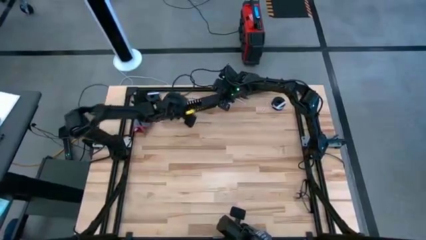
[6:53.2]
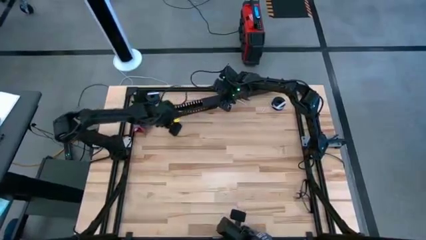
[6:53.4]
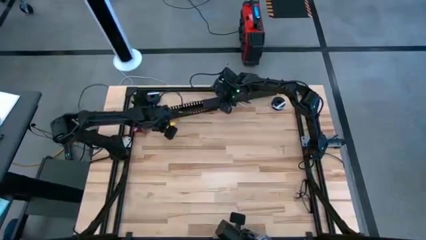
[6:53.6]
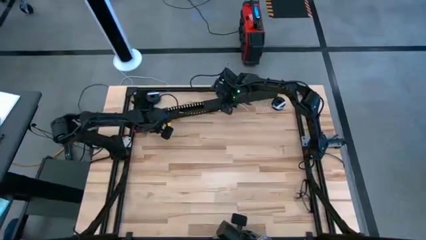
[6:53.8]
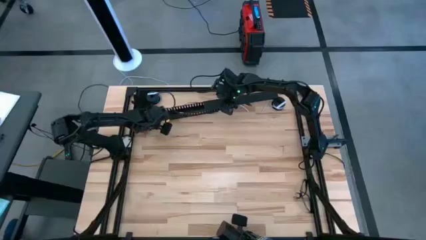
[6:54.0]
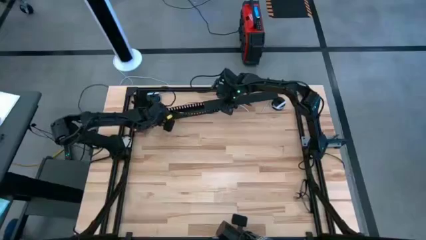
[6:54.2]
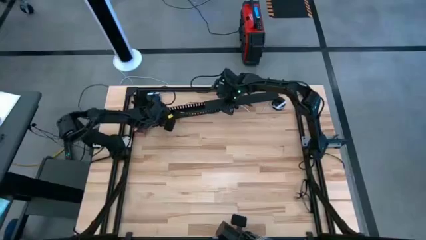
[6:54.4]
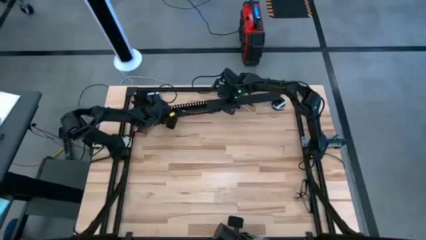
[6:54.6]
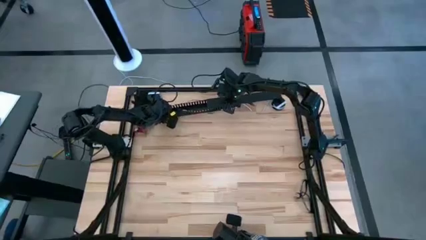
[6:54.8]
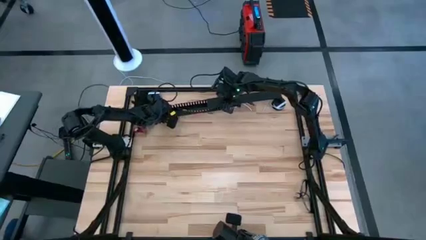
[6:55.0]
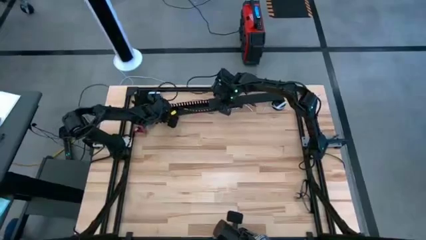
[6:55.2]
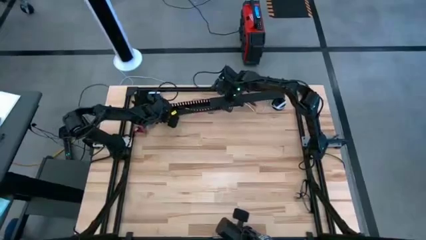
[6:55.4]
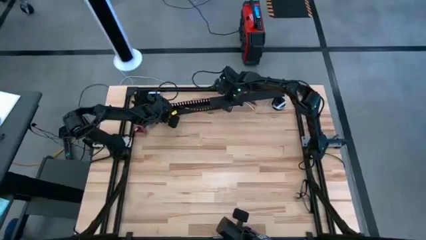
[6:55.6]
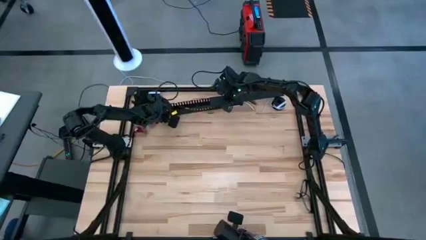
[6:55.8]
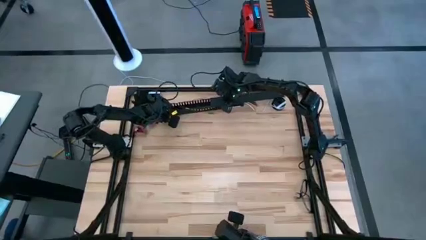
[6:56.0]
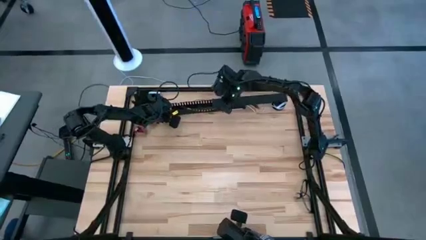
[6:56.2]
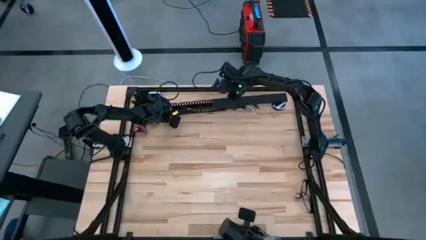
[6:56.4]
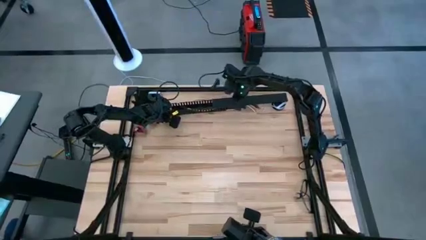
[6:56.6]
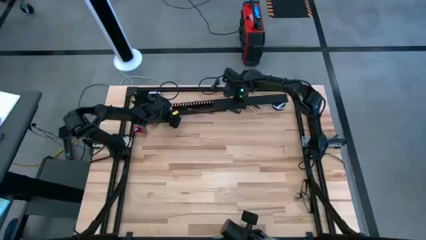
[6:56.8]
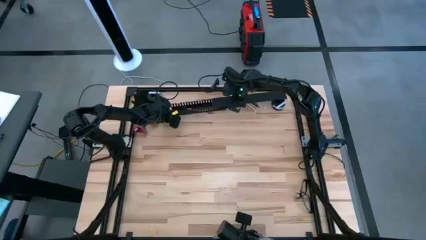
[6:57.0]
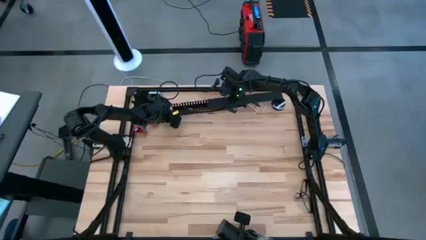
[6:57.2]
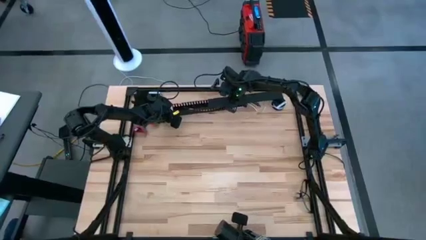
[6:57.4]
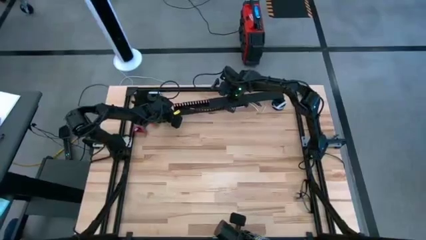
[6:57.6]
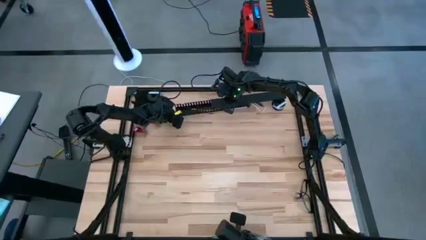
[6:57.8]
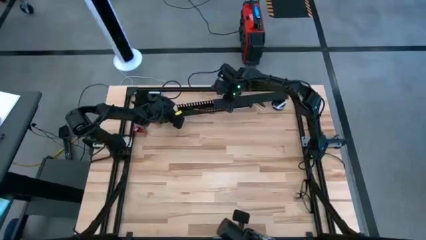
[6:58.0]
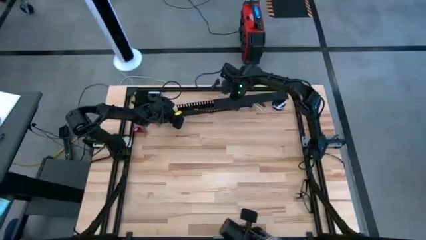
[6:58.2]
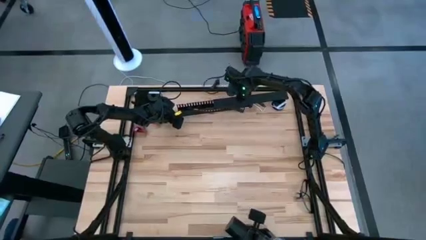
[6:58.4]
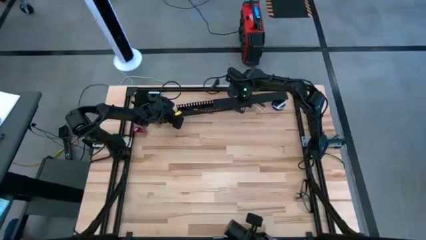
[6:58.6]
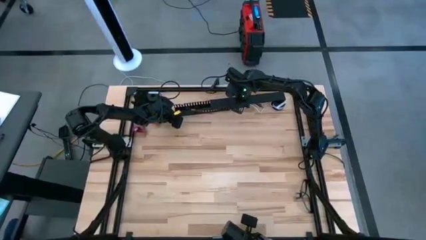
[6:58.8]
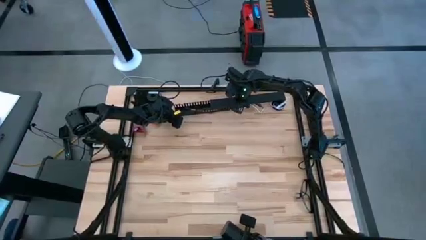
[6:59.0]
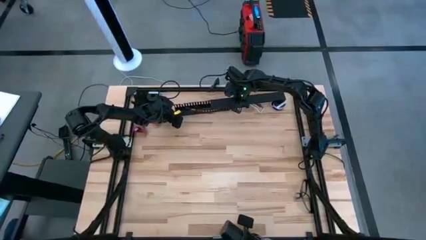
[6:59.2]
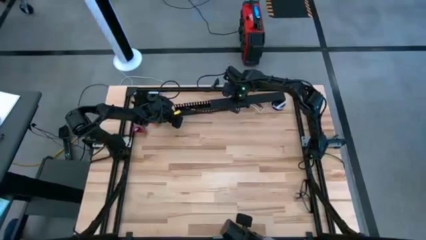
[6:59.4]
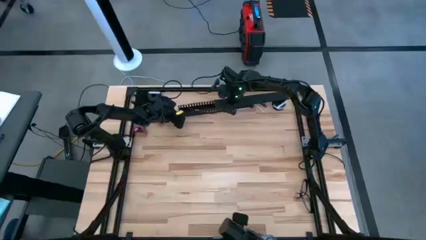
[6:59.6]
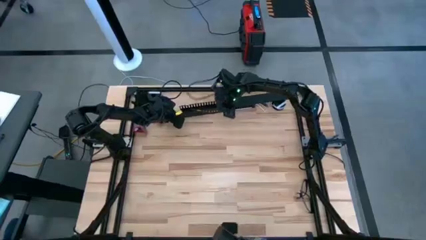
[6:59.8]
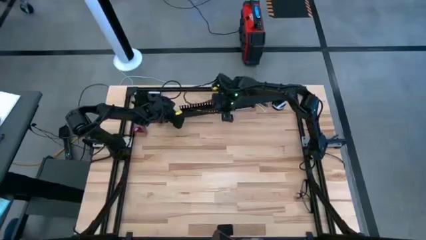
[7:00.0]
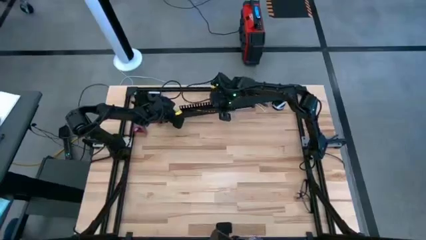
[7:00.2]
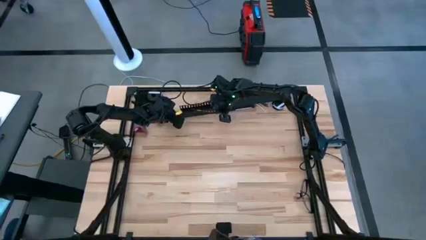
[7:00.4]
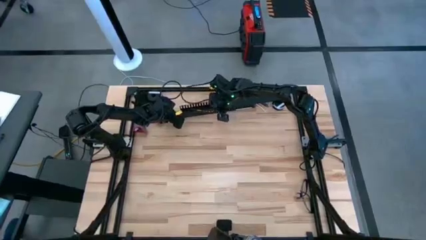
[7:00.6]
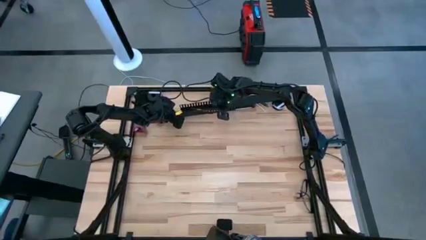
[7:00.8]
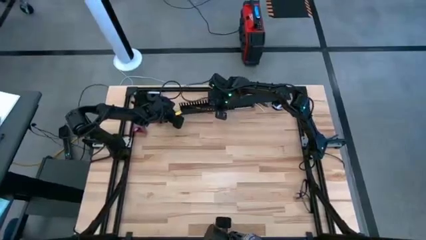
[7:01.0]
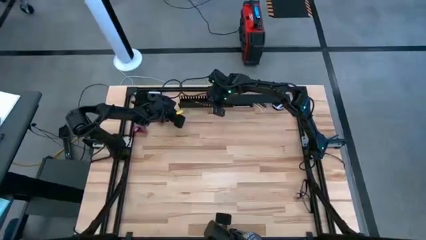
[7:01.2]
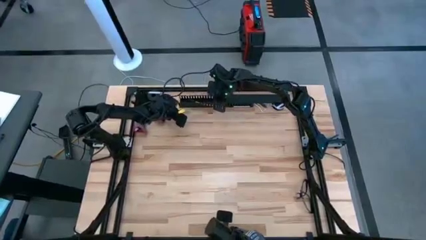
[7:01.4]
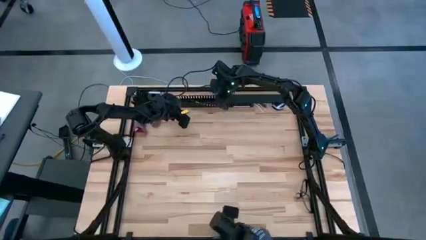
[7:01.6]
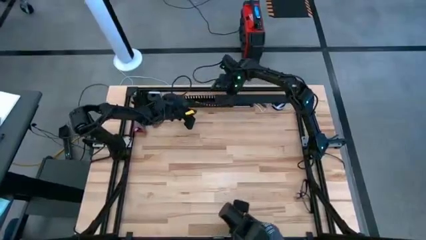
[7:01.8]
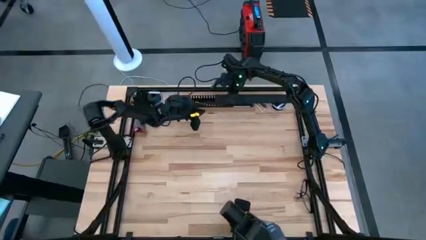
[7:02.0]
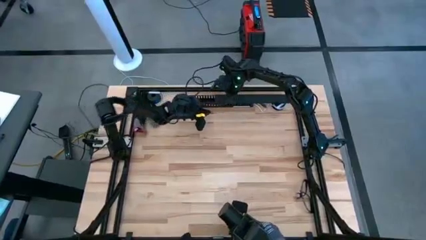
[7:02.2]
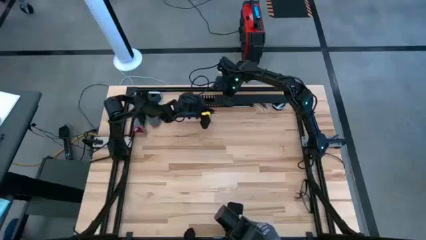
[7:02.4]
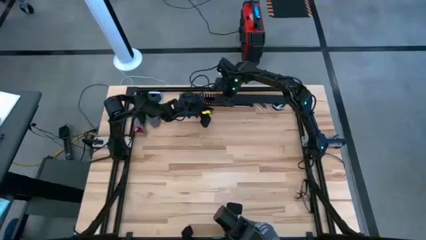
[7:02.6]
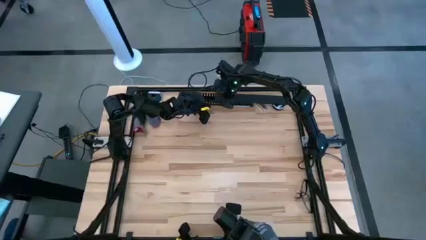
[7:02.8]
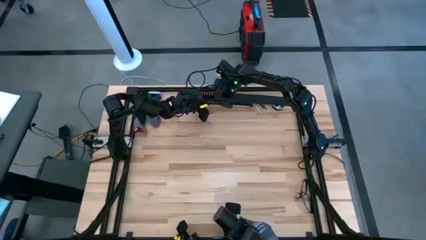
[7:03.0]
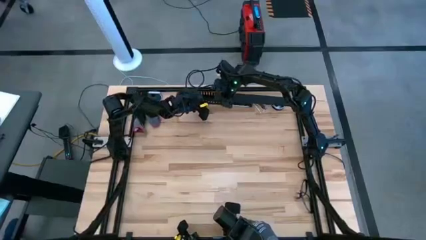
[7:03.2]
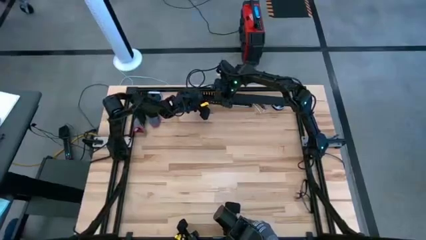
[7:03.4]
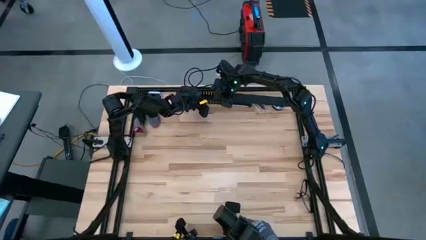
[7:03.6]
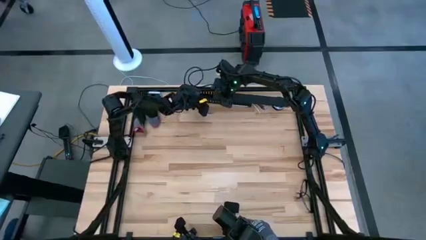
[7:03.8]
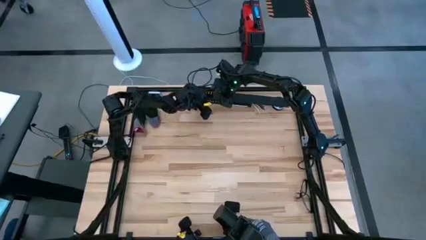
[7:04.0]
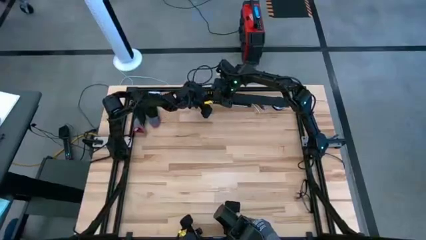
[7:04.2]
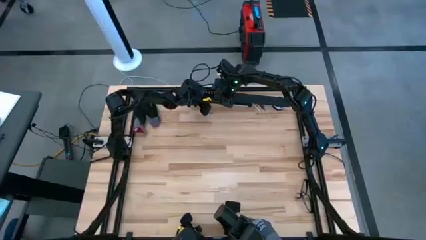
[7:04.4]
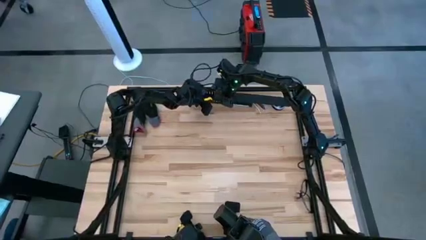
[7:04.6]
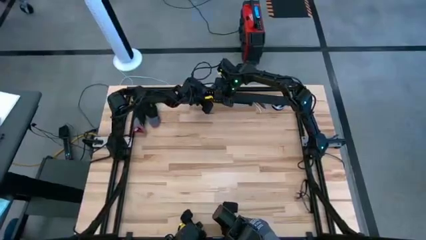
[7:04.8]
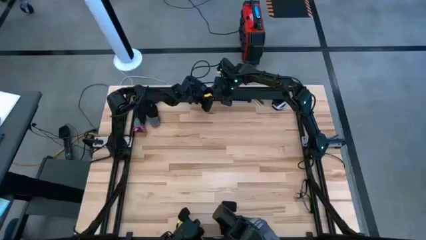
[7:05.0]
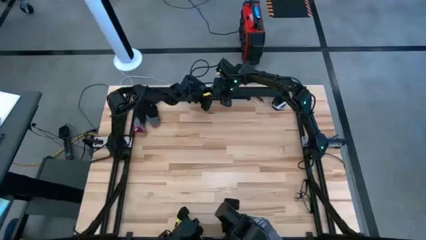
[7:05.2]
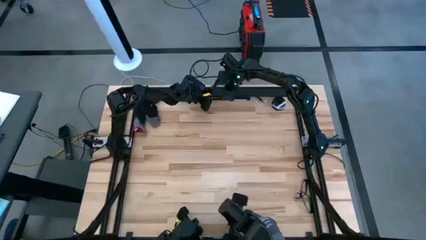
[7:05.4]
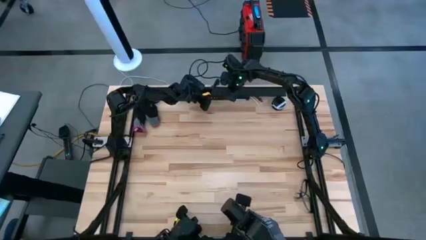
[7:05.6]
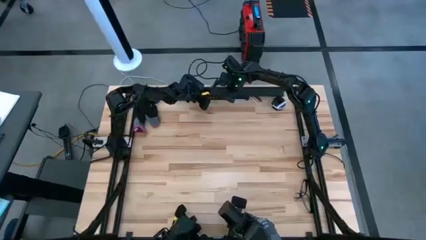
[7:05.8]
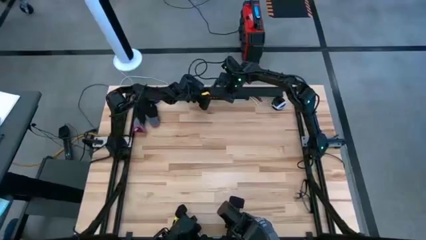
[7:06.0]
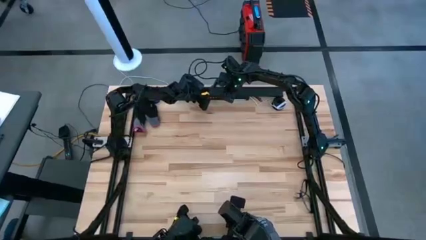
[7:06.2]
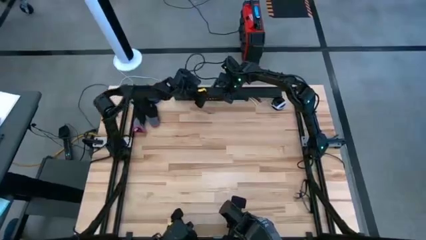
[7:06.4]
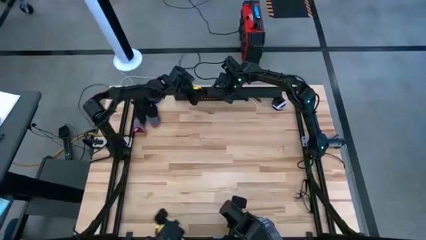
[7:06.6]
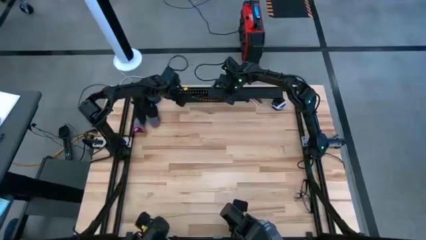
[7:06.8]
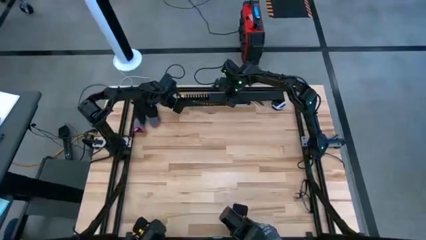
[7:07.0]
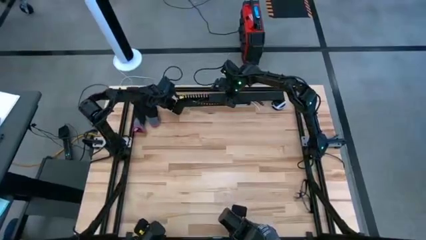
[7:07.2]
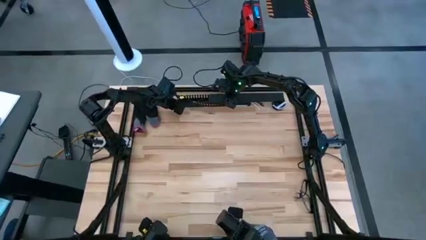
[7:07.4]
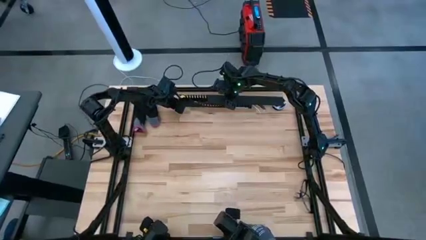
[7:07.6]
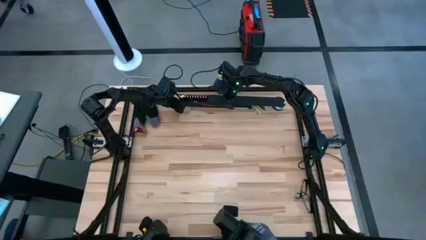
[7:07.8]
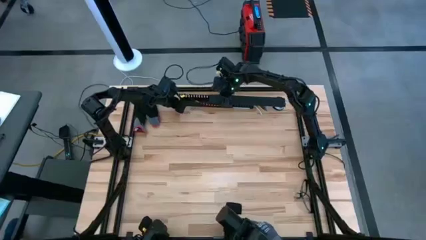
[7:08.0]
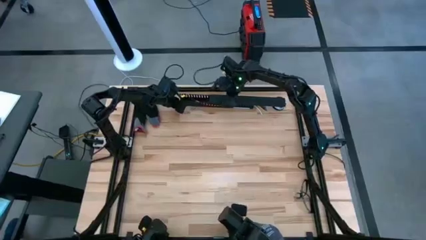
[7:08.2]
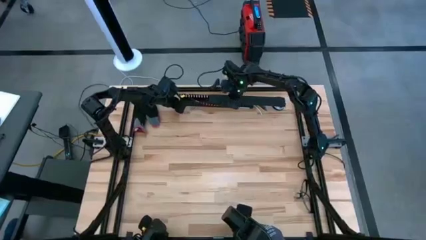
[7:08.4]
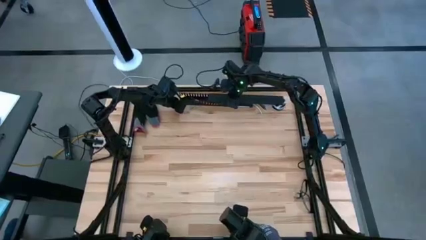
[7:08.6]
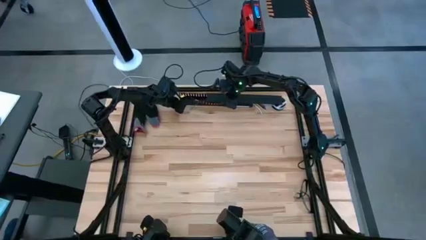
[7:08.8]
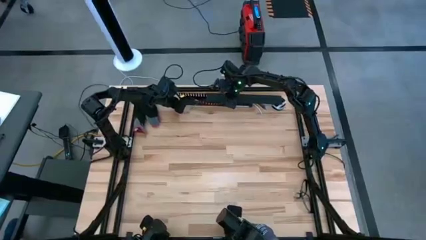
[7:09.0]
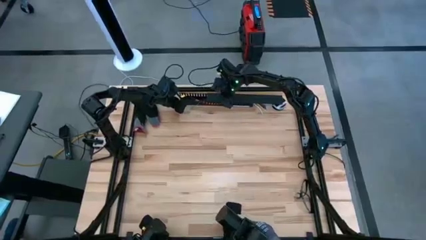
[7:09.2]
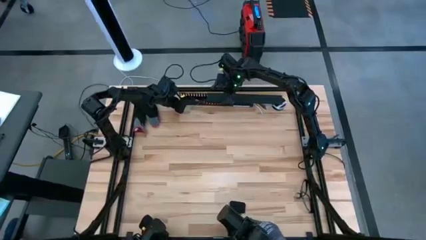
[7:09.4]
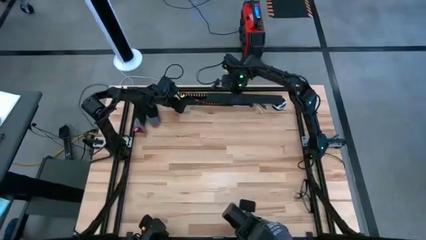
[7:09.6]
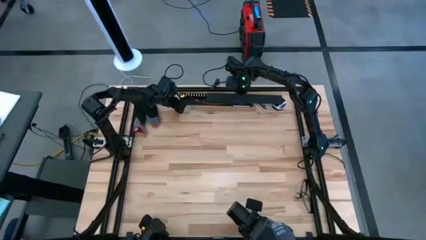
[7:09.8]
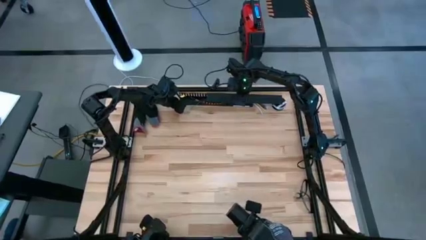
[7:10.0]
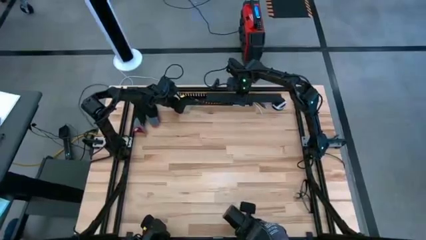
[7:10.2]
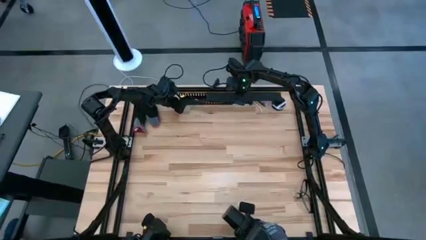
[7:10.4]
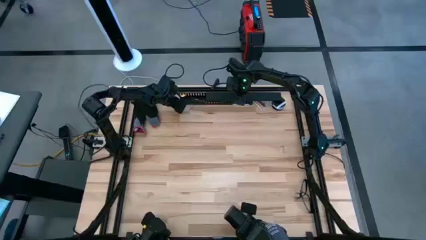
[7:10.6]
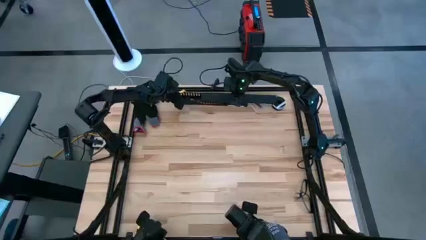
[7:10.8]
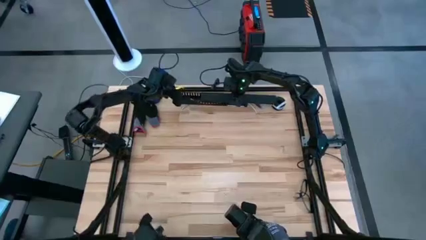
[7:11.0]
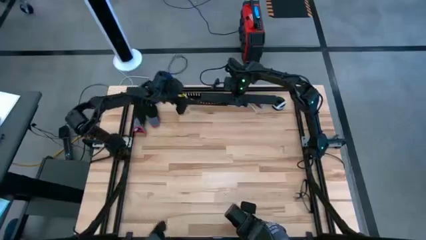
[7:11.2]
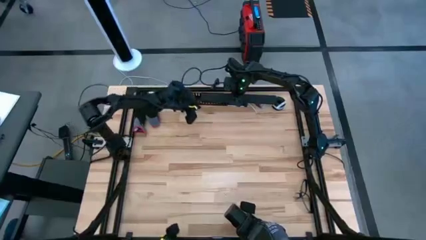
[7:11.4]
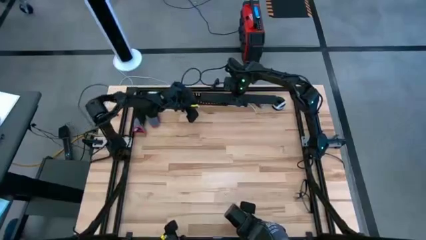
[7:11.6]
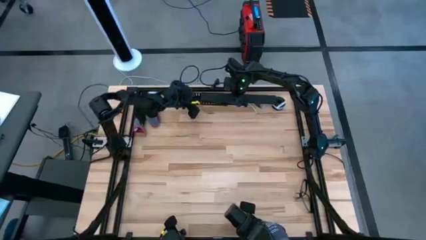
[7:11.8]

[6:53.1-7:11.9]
Task: Ziptie cables
Close the black cable duct
